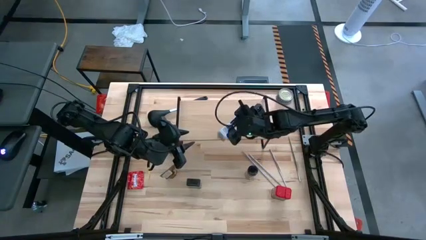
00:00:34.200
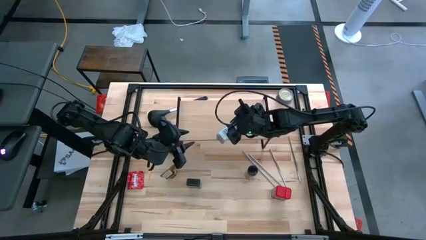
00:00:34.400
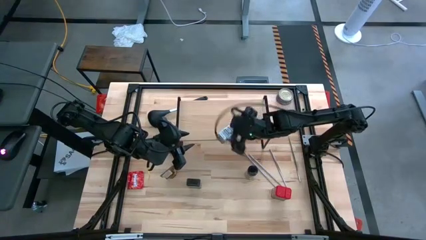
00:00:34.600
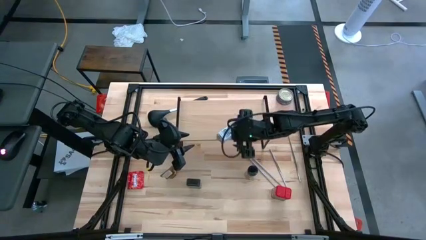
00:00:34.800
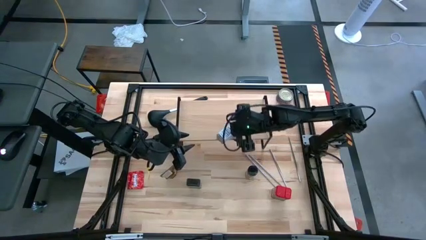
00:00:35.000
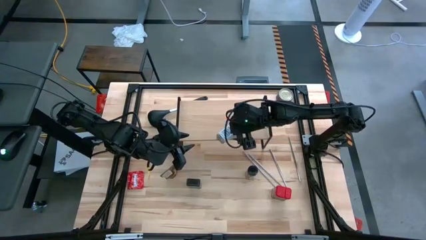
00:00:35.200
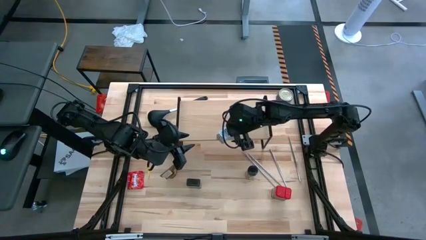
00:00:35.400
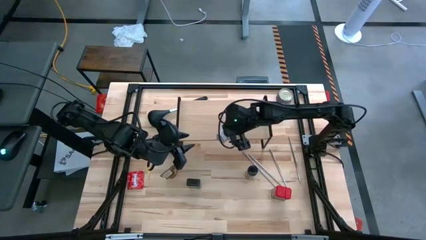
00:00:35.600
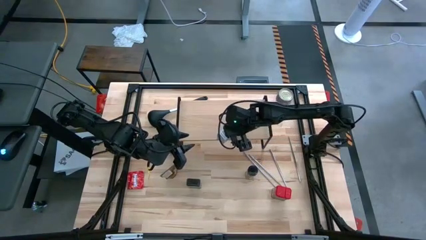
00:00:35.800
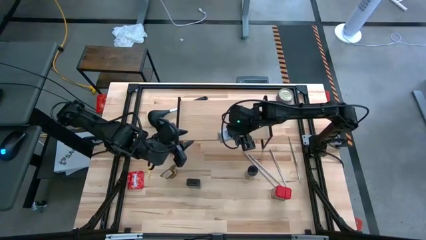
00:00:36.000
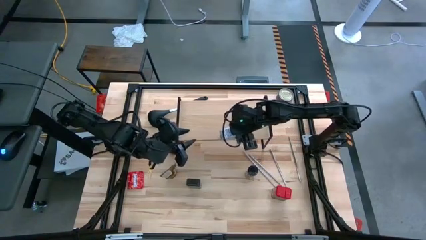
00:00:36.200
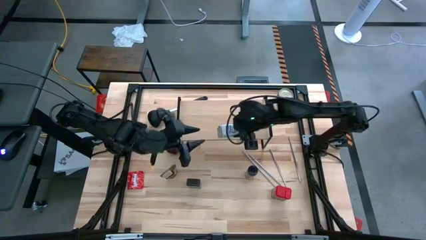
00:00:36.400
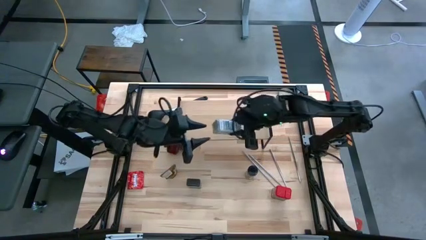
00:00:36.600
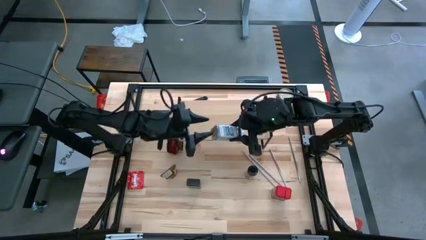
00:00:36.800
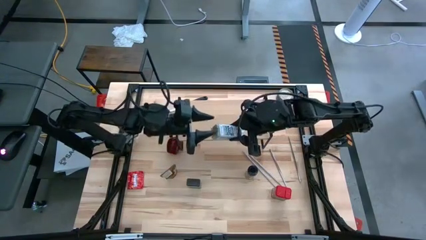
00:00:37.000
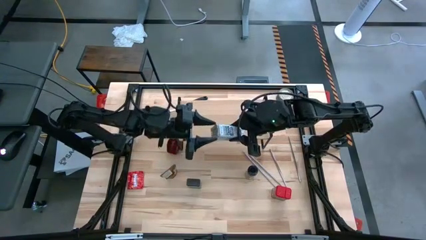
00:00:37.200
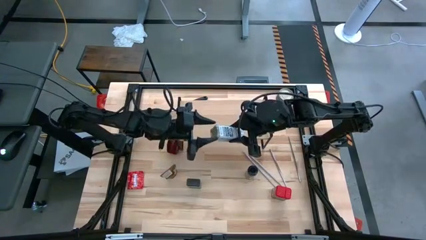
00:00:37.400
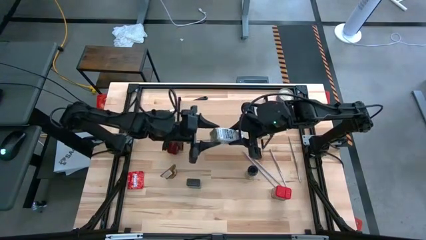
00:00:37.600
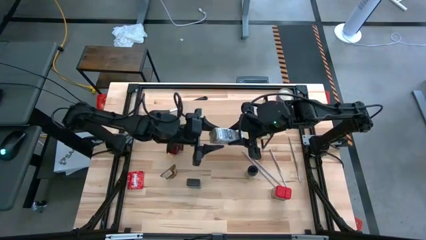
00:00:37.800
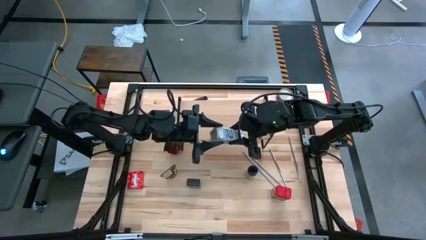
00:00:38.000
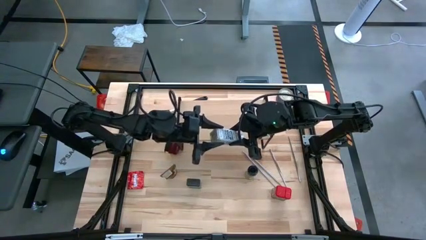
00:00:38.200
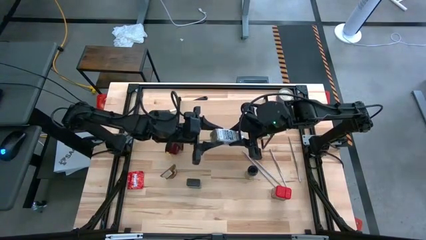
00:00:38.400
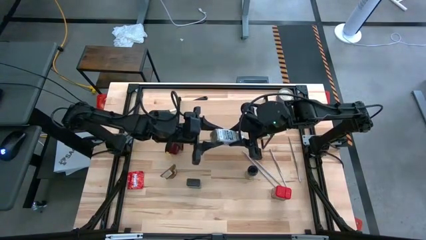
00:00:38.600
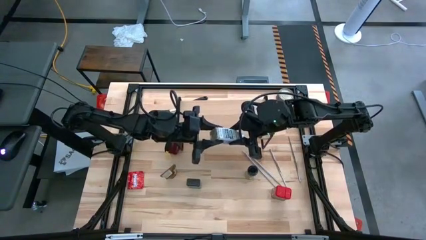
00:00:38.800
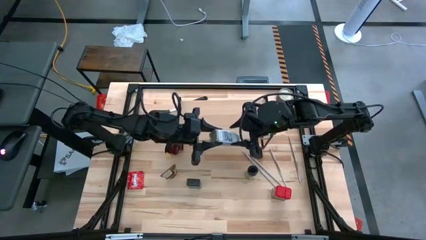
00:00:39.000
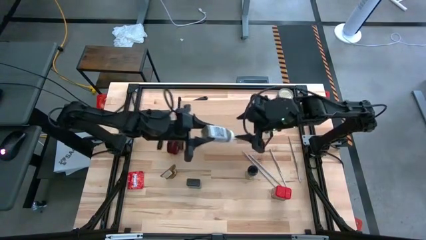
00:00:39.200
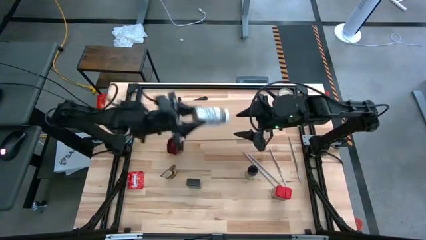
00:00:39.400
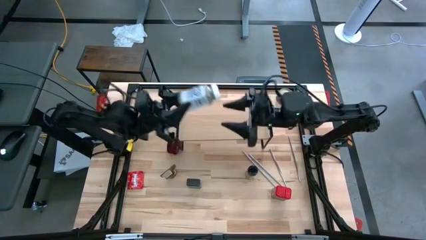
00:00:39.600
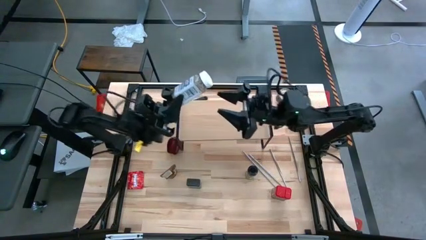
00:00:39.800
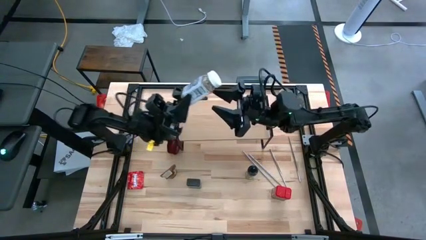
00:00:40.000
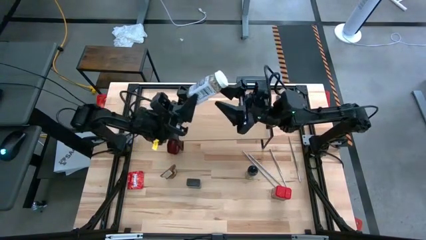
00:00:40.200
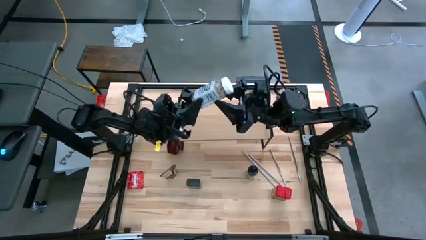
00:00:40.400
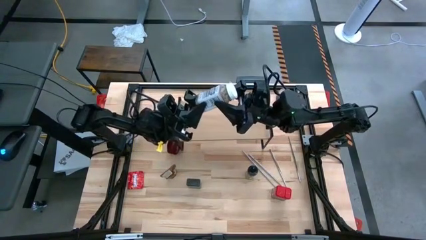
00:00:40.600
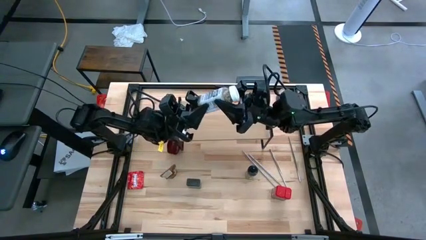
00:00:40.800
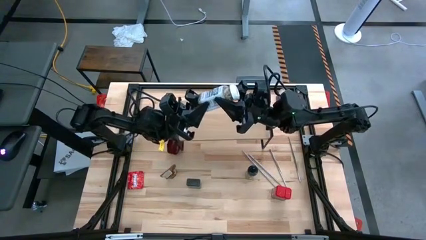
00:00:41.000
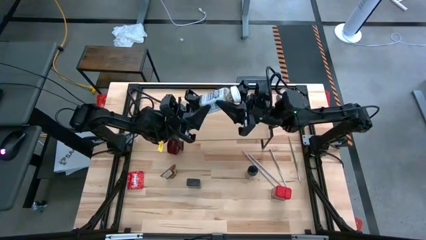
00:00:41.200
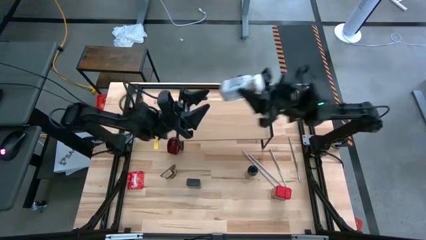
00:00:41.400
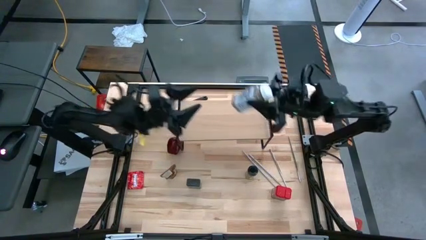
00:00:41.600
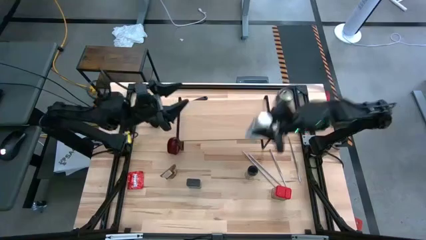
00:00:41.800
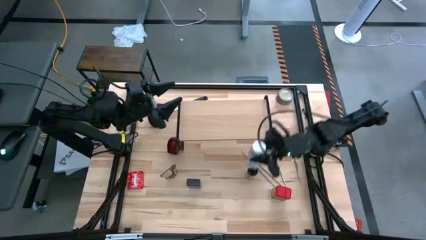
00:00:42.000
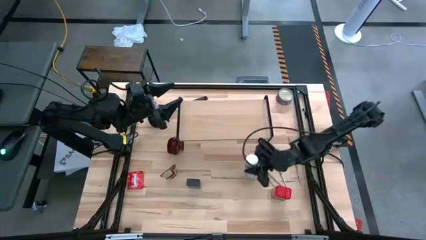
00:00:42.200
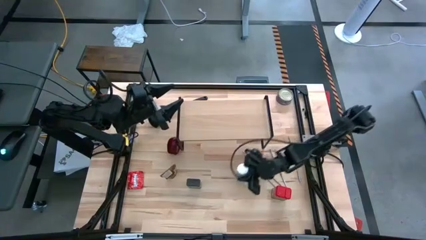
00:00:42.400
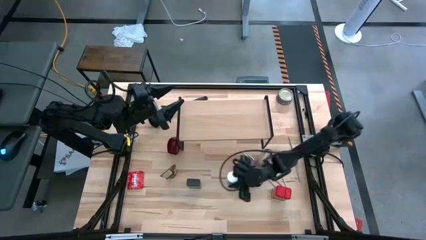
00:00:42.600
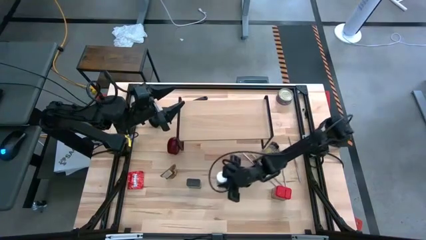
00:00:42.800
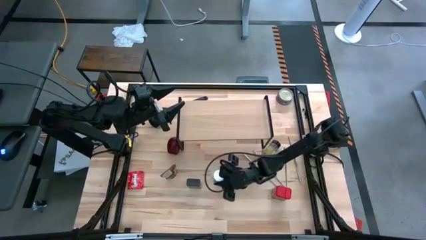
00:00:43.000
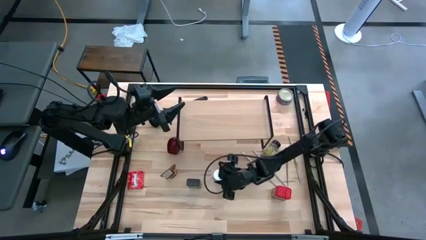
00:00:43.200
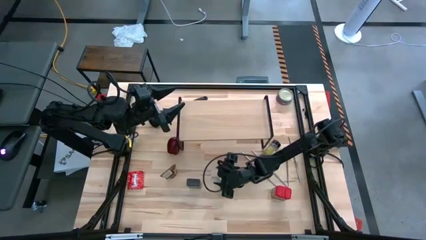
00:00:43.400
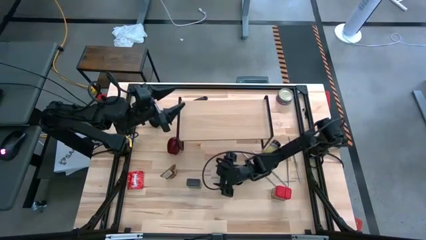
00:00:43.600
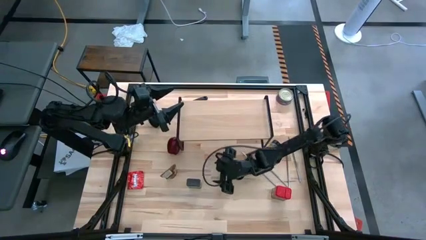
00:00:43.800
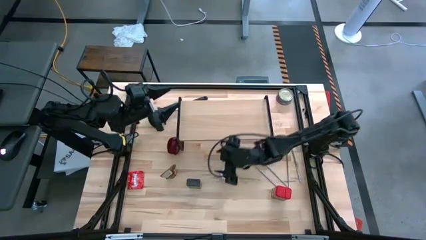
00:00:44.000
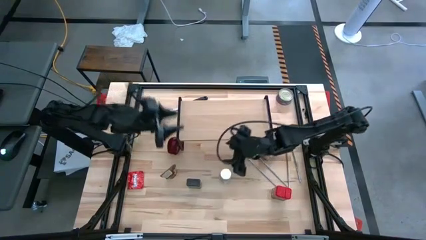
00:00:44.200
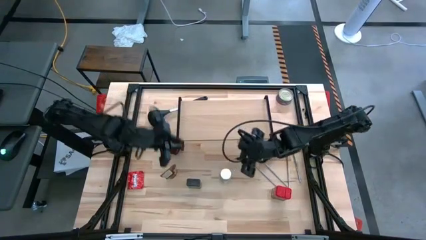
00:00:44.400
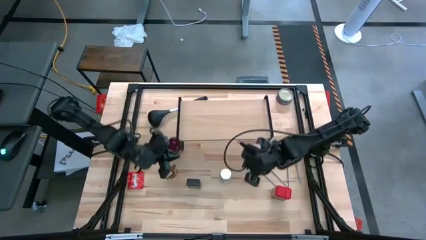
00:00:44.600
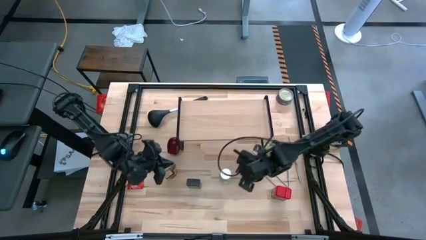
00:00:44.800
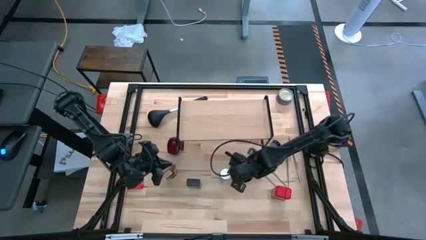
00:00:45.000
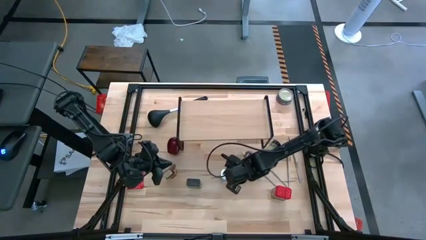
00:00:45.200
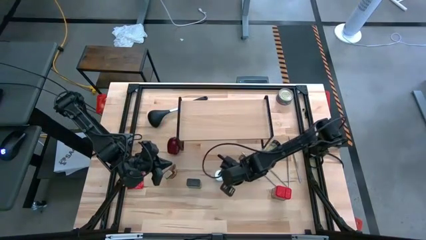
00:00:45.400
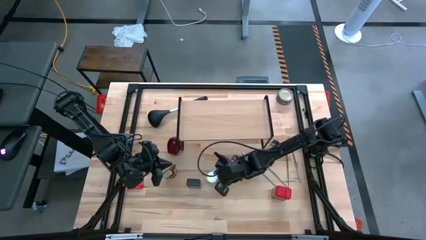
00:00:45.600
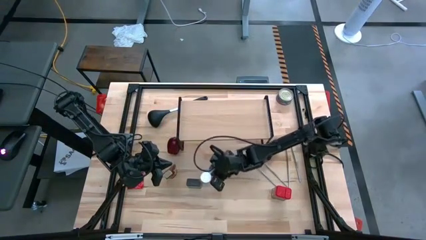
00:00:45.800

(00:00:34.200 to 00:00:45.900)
Task: Shelf spices
Remove the white seasoning bottle from the shelf
